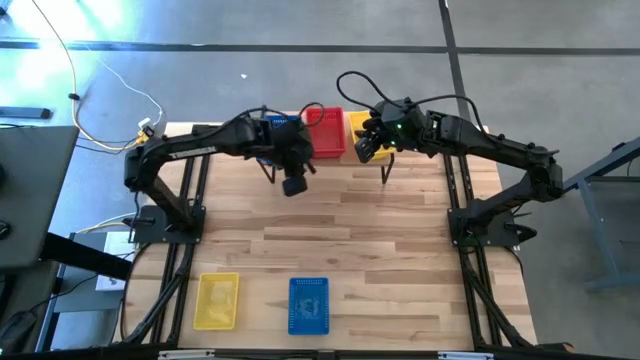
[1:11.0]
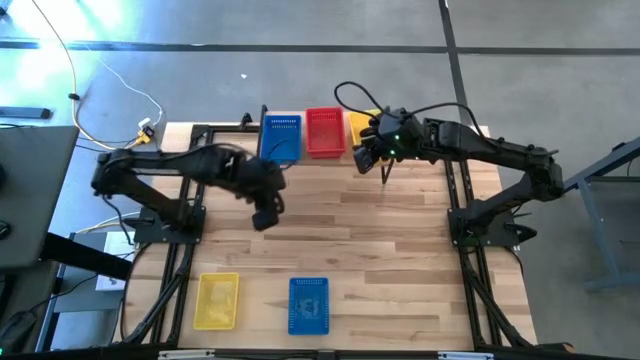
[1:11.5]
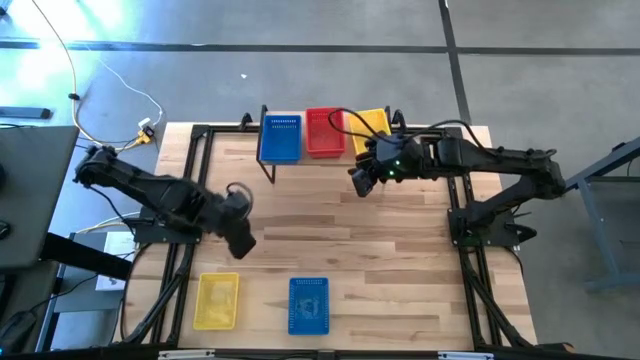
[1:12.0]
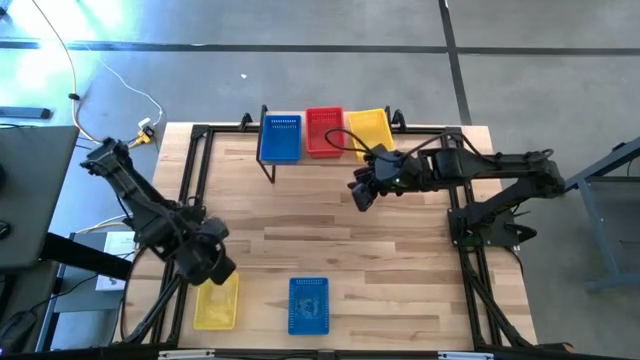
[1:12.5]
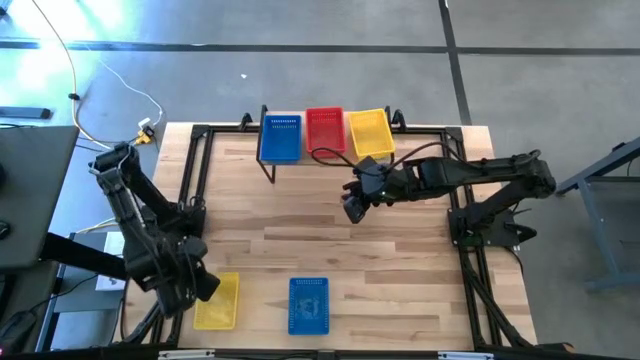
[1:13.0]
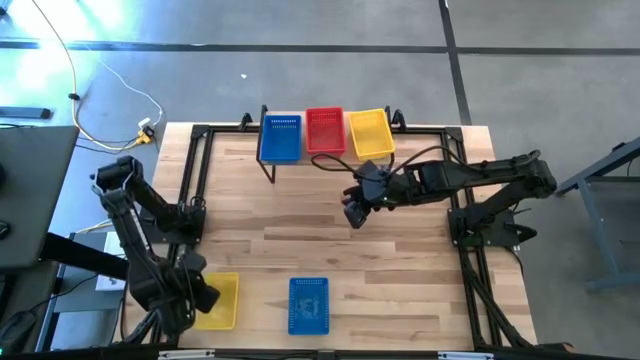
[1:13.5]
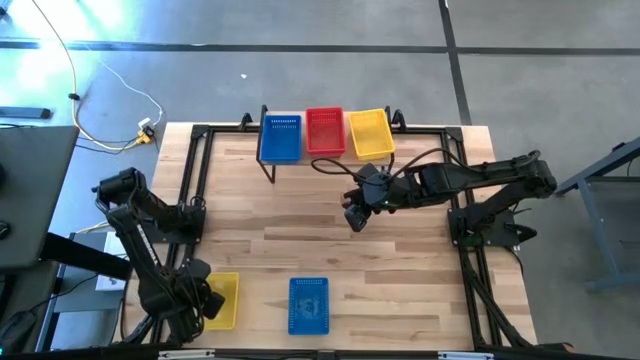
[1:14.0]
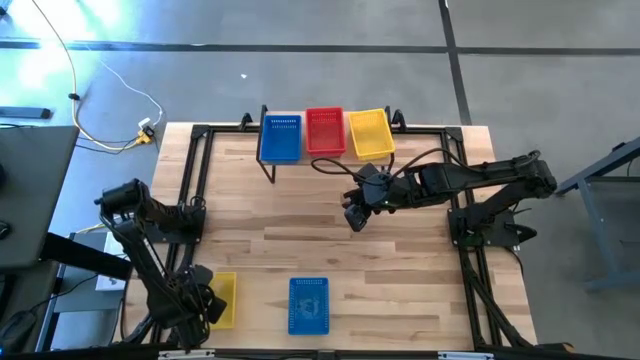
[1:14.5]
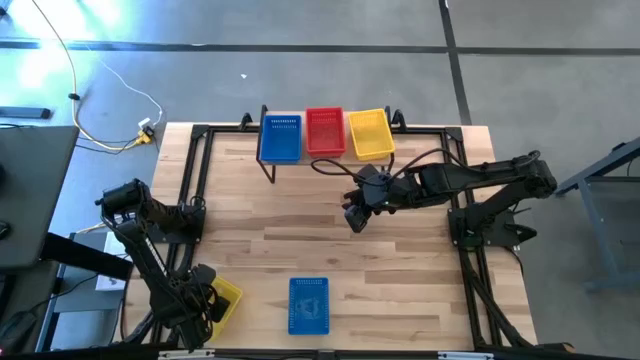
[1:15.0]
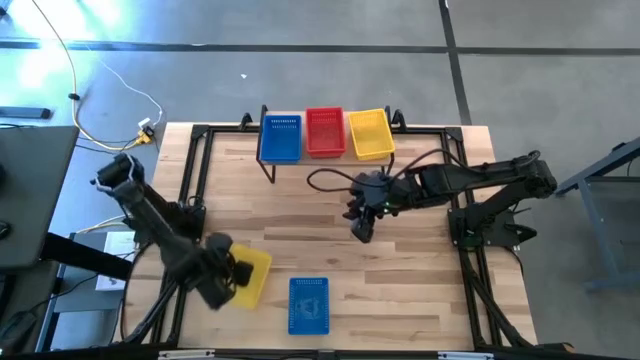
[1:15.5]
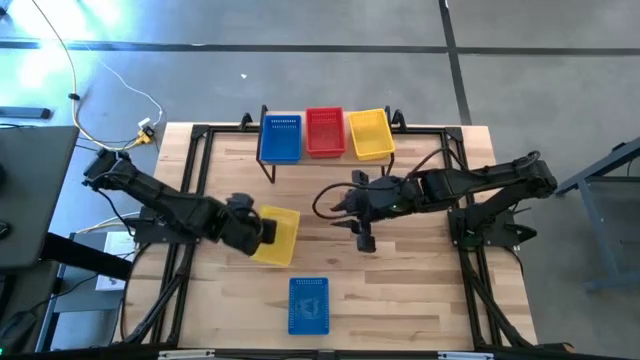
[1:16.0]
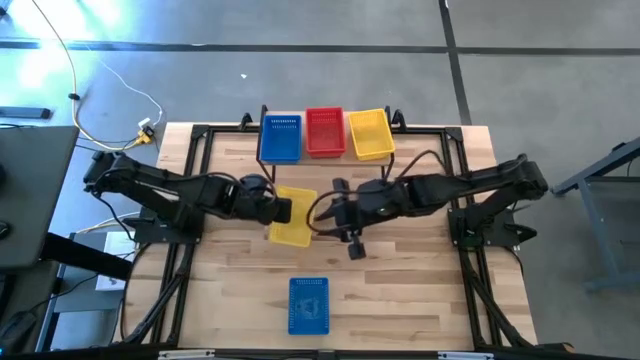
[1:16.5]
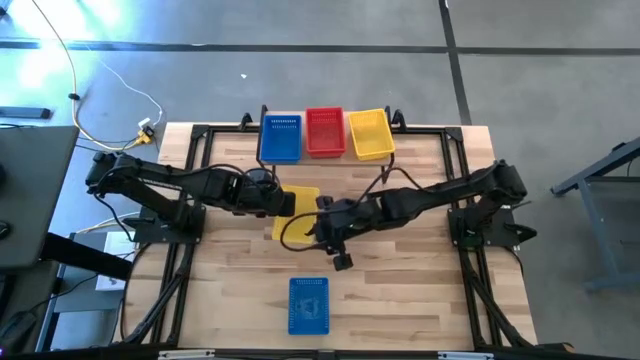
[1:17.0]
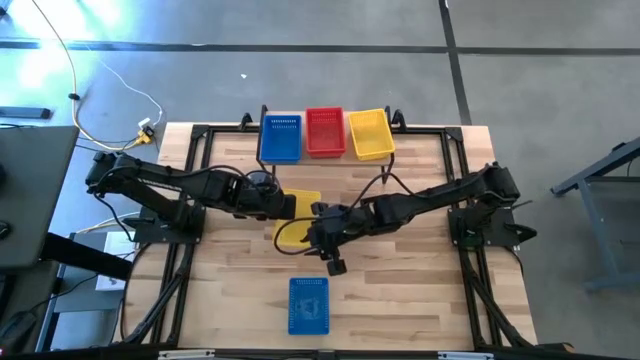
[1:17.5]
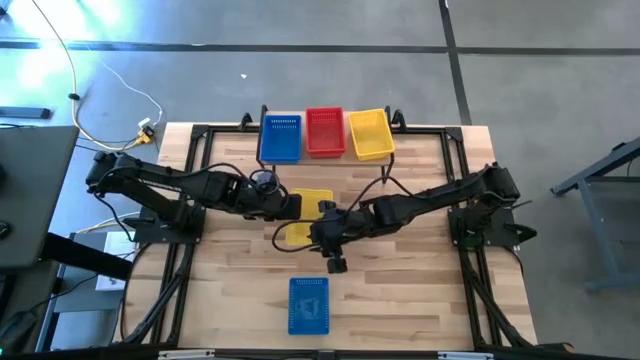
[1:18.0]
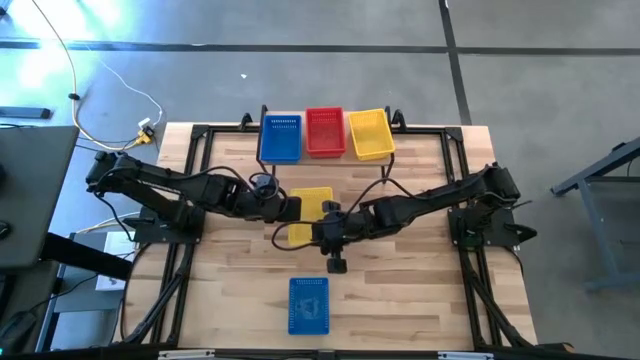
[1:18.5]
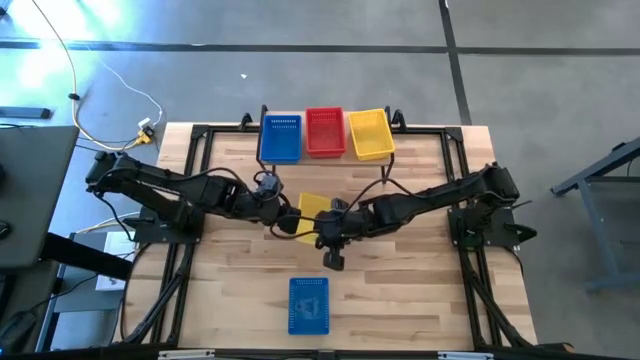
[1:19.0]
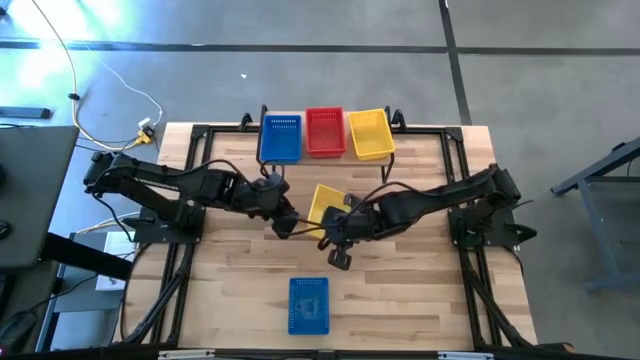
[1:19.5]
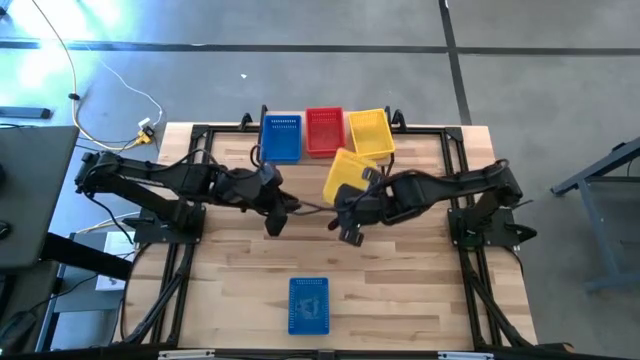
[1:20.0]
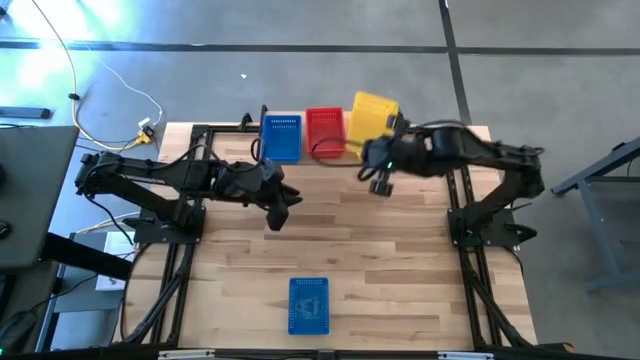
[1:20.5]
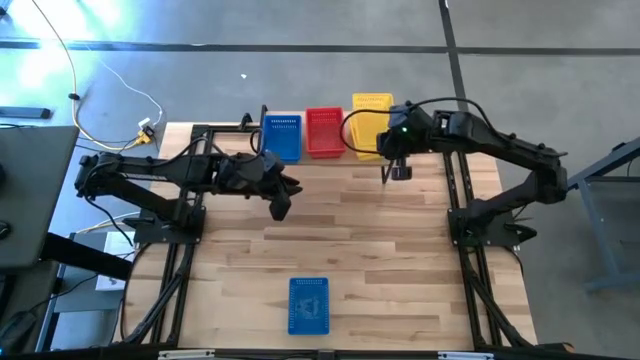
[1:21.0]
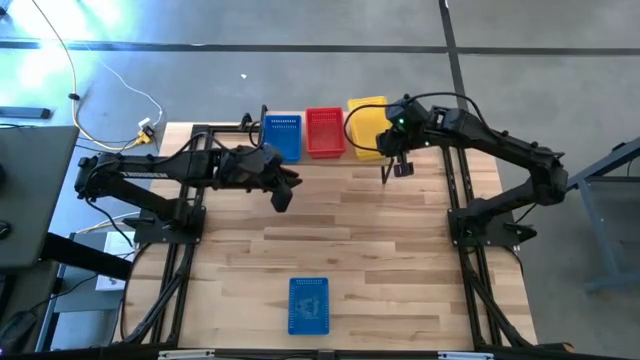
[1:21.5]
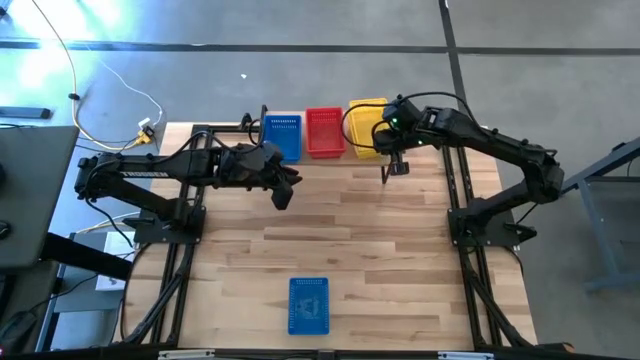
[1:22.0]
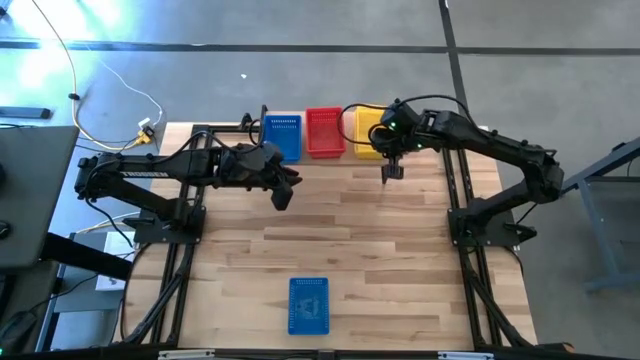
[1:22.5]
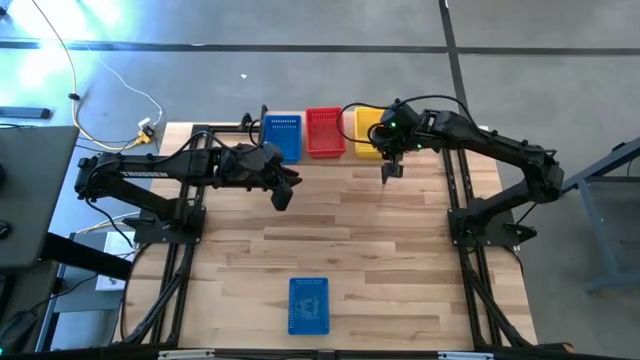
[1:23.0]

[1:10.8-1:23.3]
Task: Stack baskets on shelf by color
Stack the yellow basket on top of the yellow basket on the shelf
